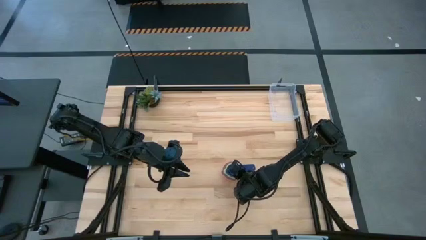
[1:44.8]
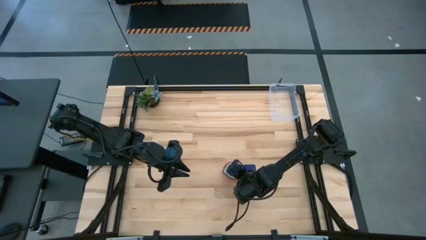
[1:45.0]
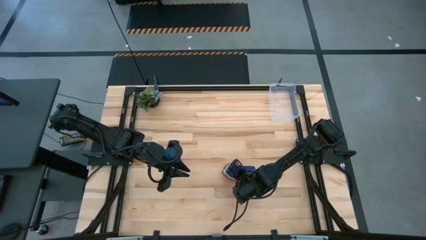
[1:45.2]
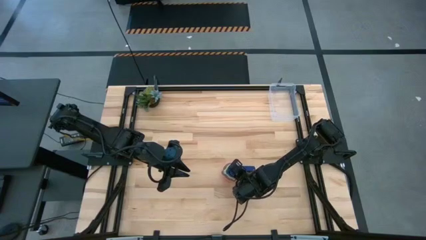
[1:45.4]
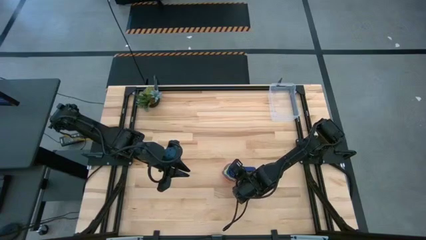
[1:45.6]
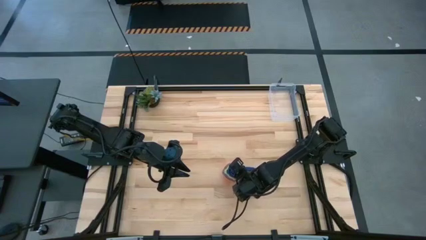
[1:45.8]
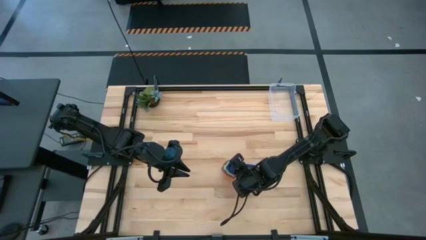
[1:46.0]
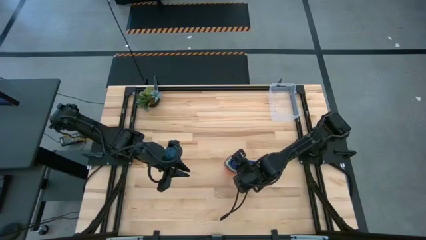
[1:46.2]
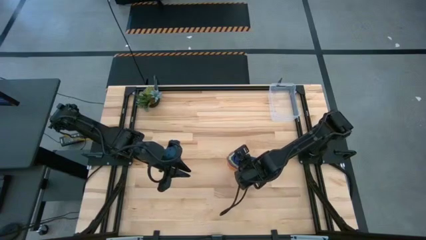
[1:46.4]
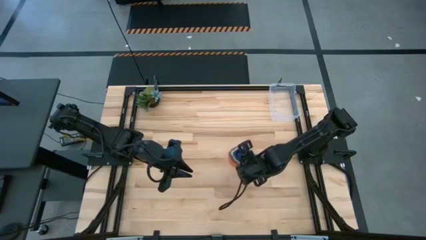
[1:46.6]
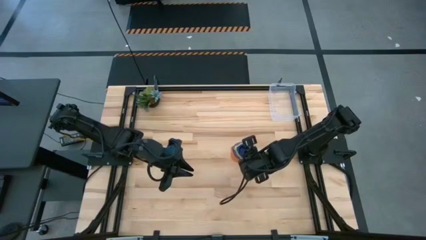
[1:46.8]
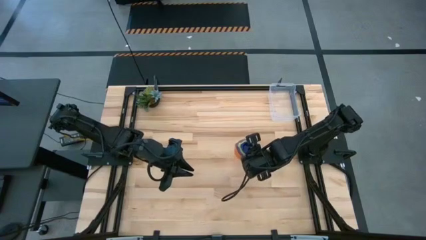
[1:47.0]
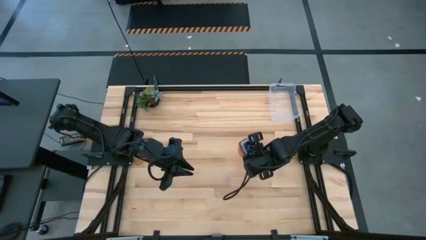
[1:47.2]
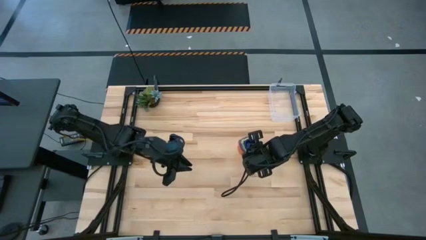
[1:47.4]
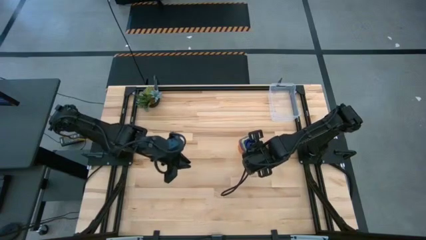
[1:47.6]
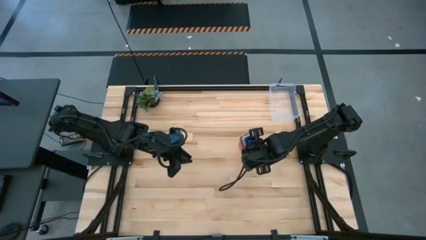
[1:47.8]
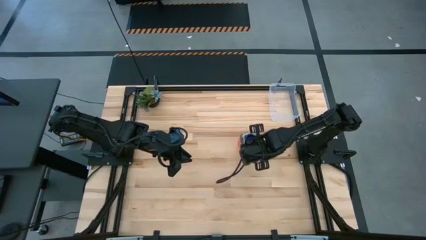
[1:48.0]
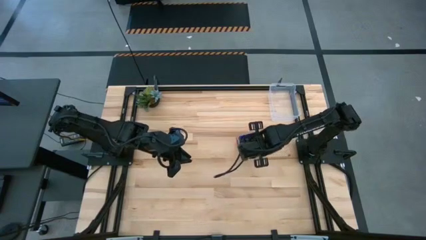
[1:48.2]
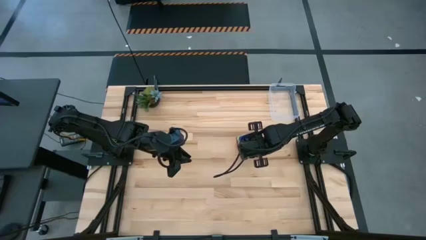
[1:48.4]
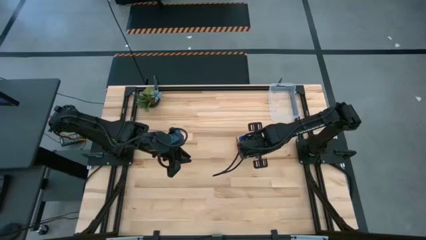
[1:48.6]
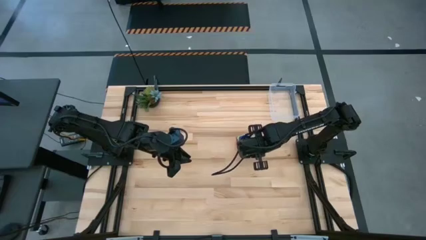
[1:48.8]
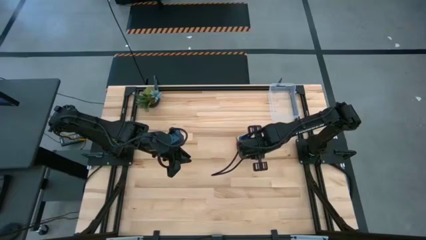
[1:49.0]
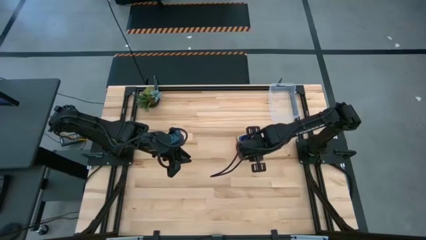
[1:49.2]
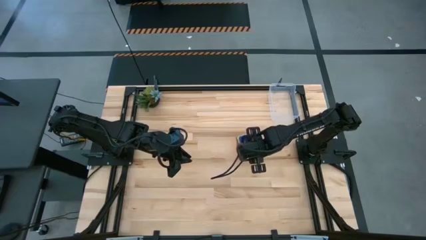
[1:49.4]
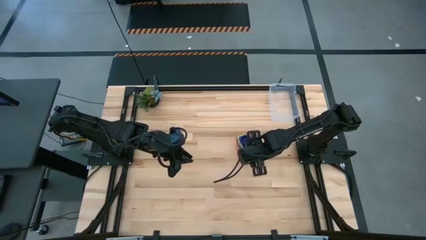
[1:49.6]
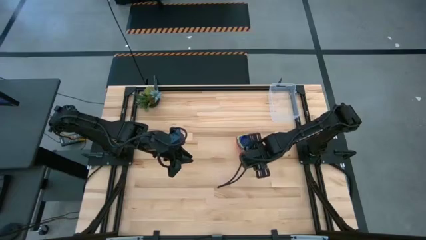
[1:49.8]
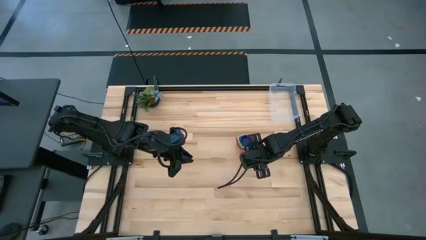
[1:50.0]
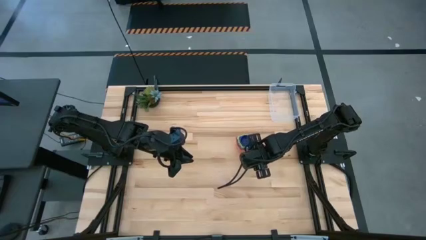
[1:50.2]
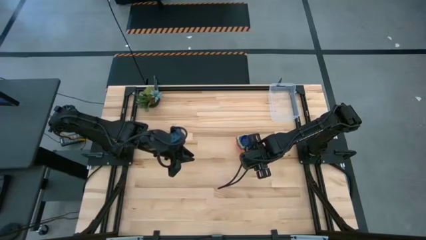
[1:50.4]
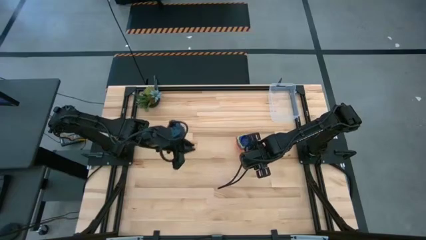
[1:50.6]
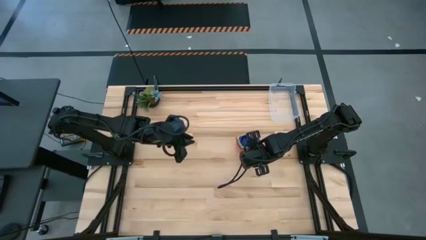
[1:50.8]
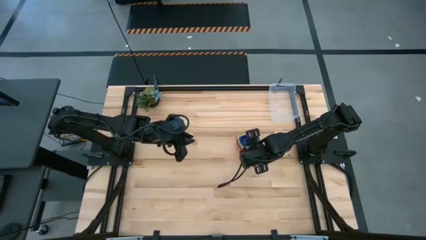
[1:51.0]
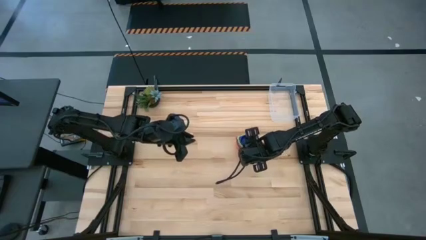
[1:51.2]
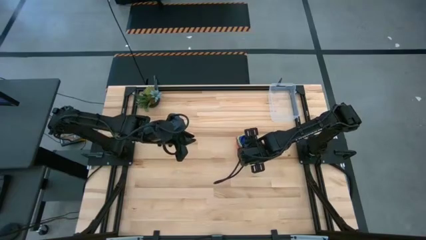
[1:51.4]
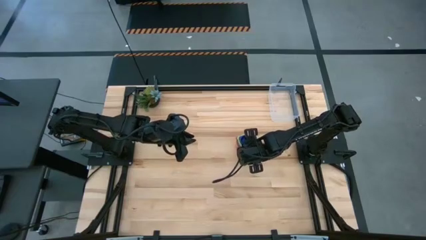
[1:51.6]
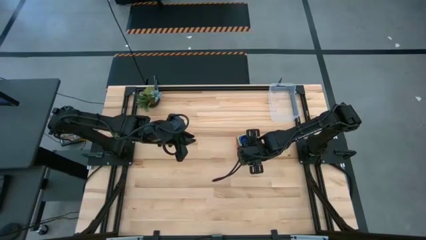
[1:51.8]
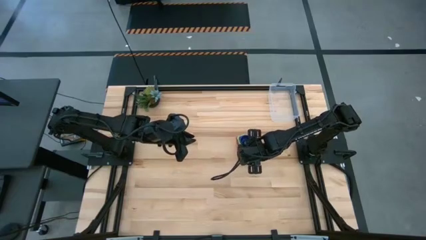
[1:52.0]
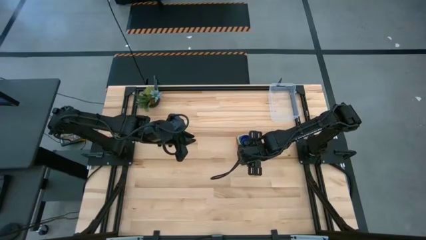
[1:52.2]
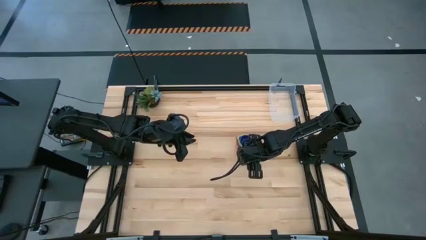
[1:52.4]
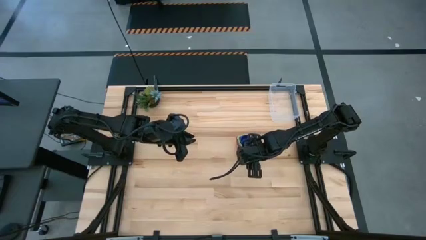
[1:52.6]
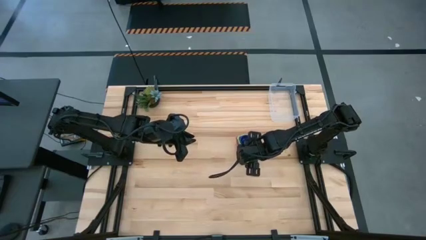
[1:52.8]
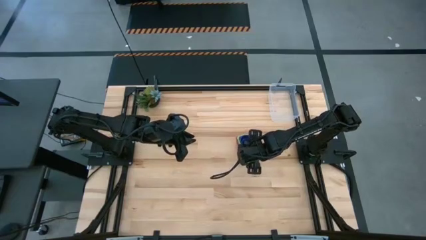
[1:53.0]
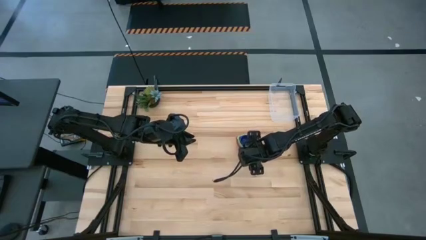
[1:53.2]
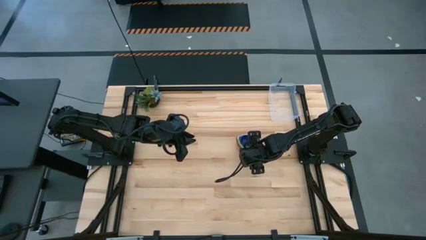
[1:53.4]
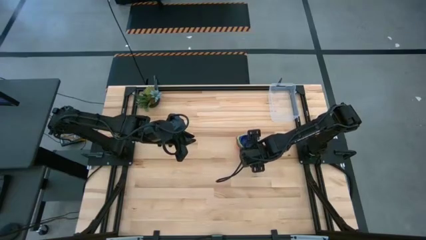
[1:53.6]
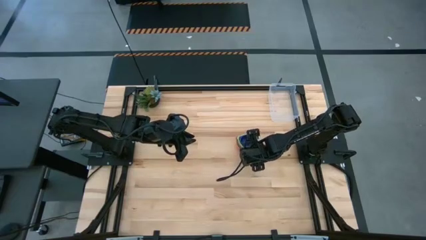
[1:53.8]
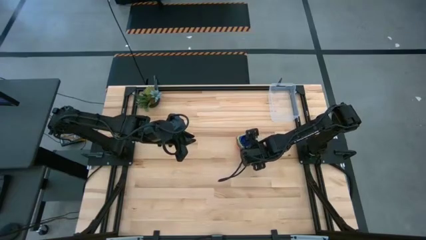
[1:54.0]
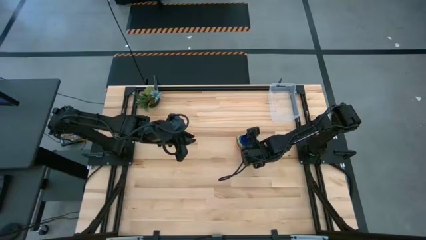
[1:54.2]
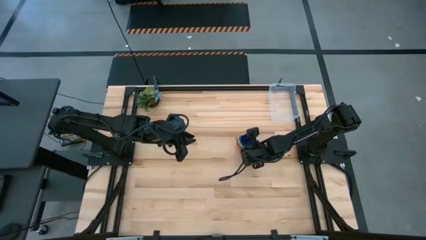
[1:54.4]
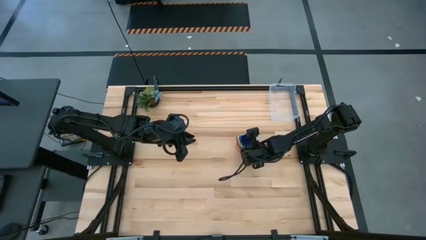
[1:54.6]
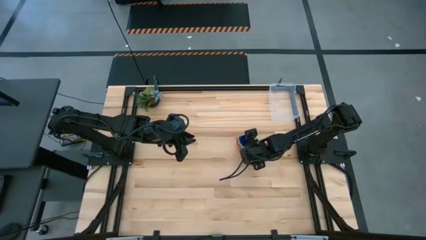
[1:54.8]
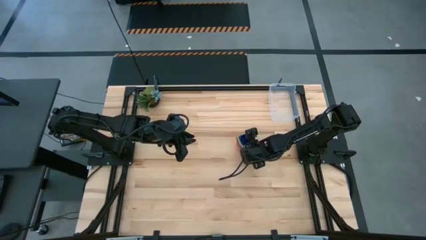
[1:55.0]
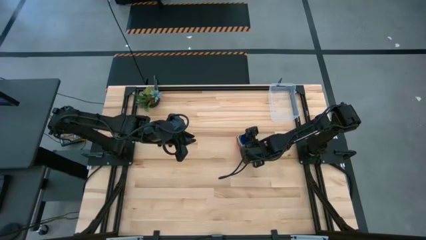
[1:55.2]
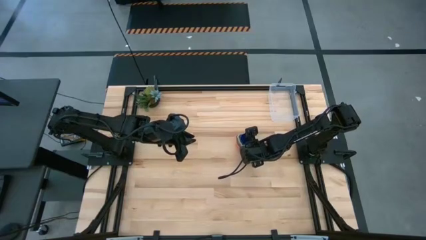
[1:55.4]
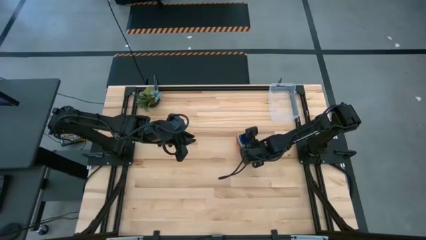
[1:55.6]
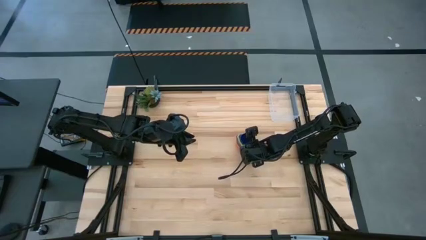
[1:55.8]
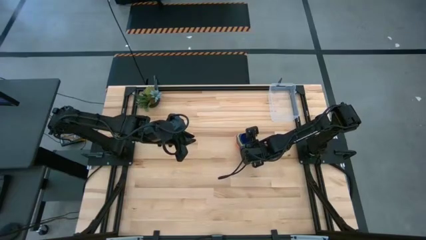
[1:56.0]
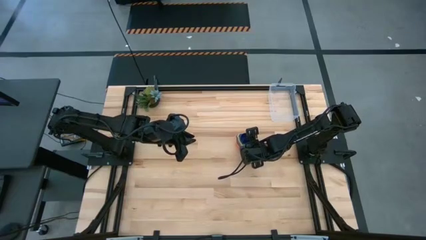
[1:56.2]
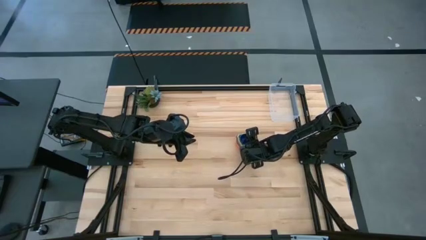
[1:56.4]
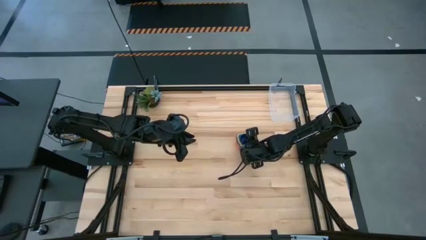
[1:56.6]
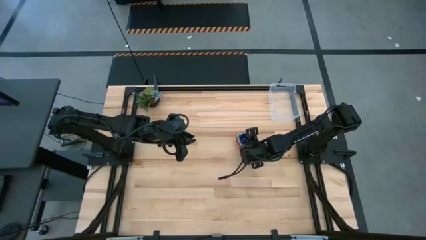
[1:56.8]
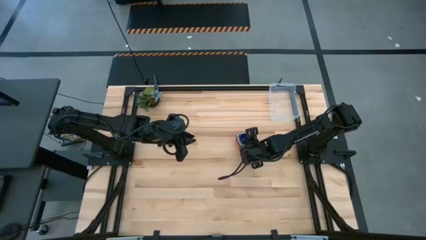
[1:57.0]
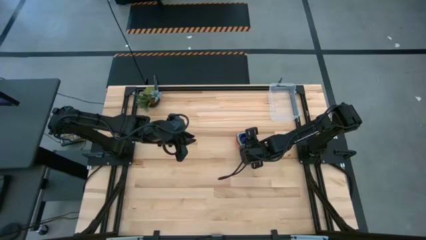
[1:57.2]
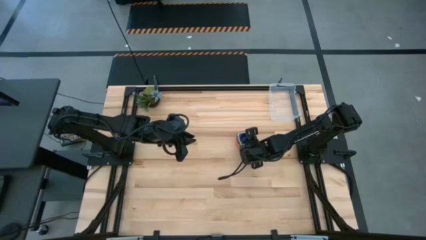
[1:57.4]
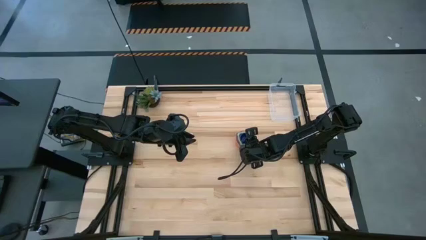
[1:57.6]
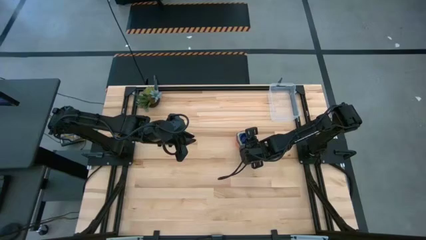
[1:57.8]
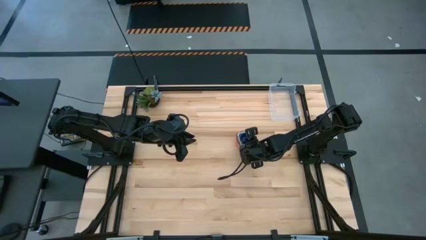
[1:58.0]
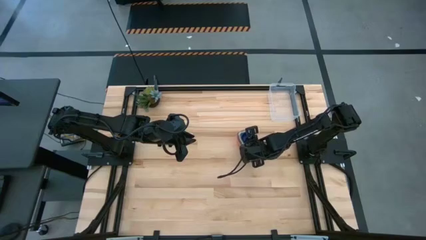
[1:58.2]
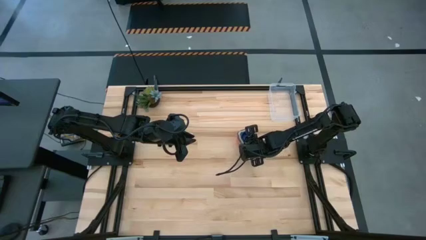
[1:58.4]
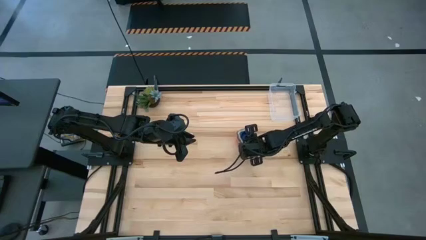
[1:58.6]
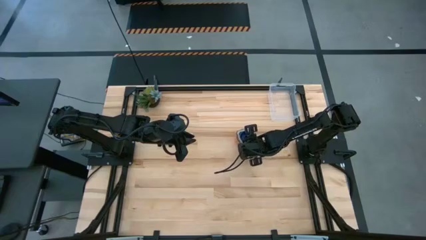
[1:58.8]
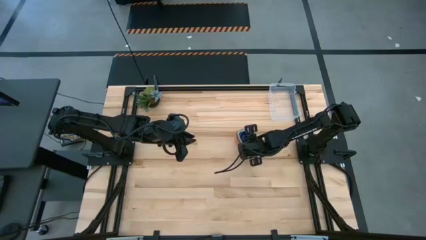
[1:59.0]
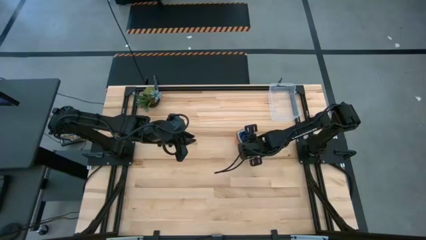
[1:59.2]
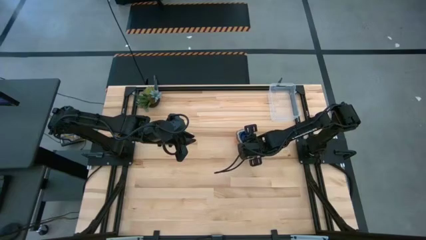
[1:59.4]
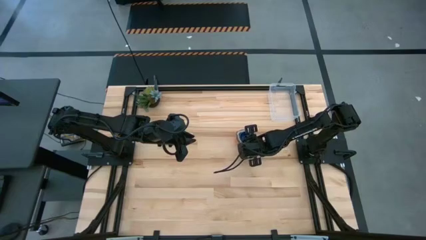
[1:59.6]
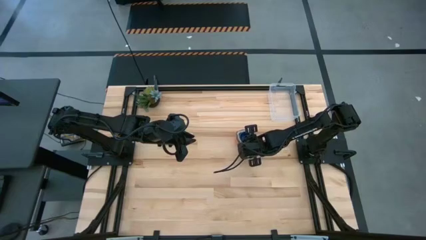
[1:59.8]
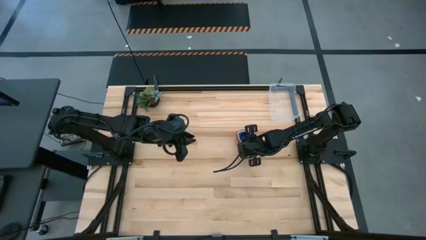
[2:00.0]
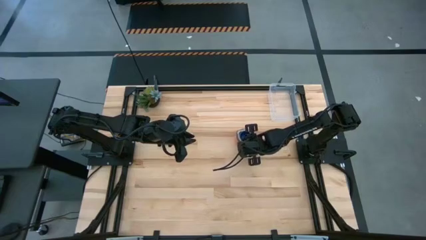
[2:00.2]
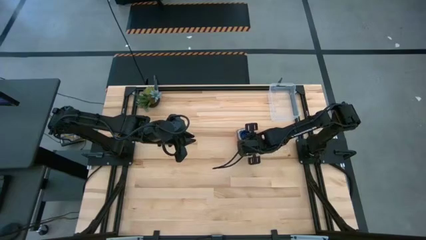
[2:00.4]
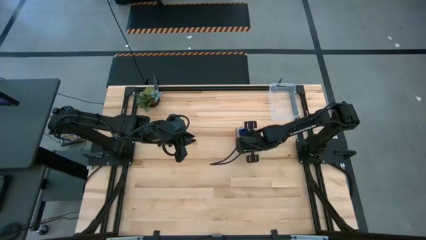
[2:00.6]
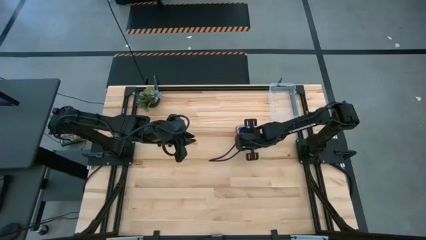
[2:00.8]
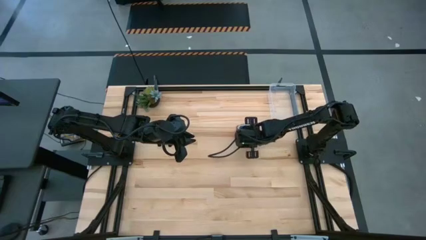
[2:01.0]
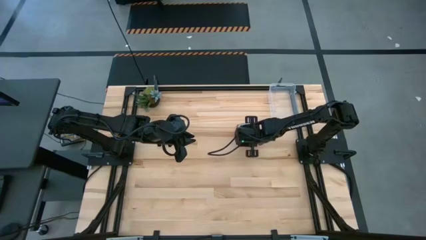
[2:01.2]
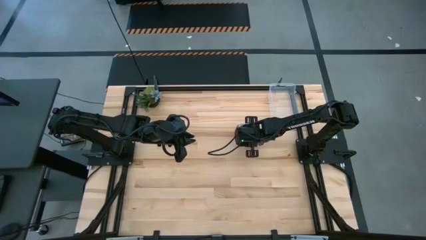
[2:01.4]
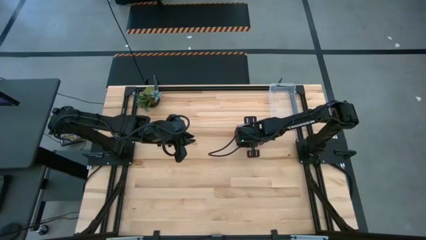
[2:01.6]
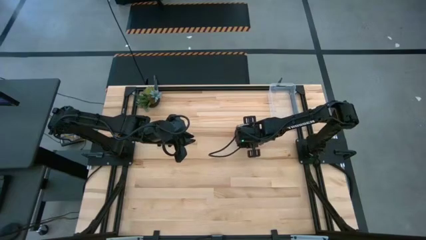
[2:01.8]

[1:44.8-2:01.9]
Task: Nest measuring cups in basket
Put the stacked measuring cups into the bin
